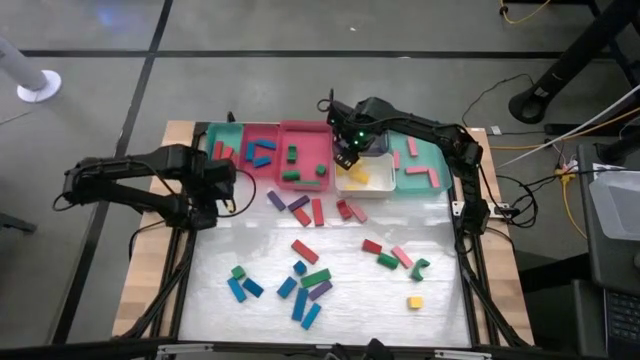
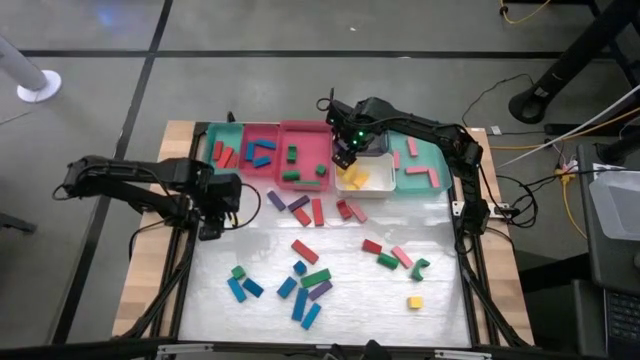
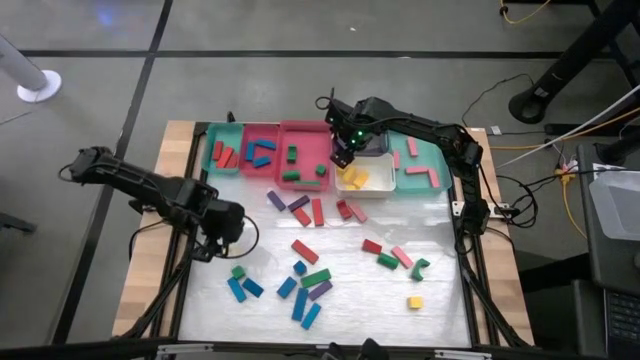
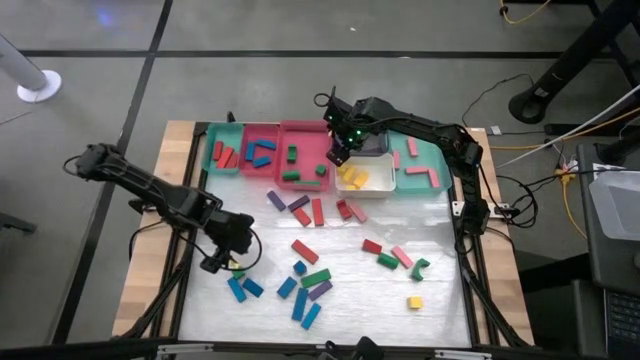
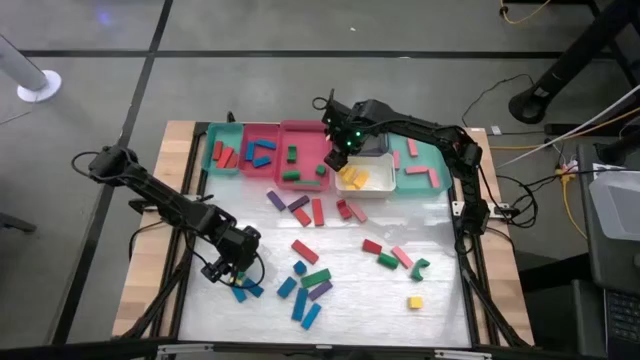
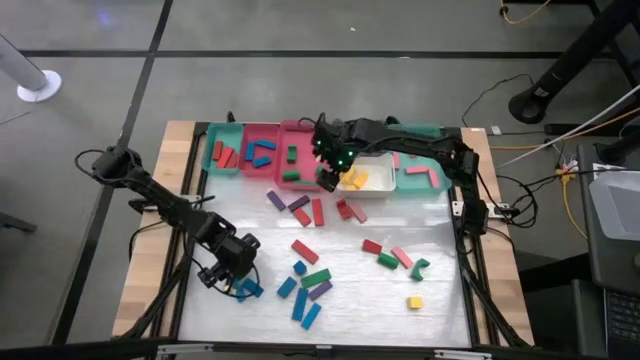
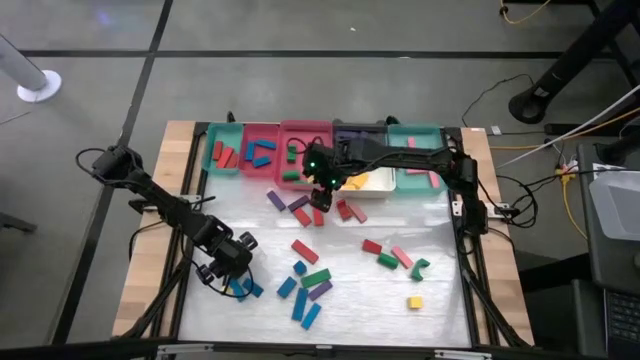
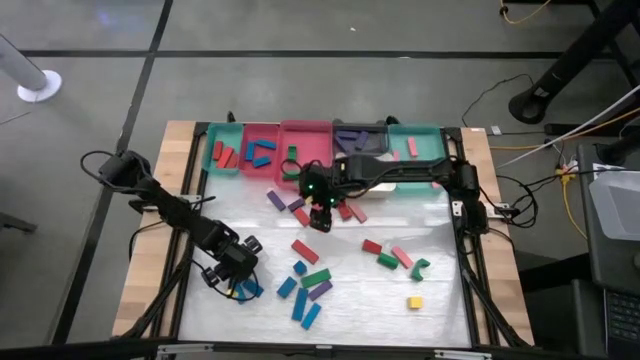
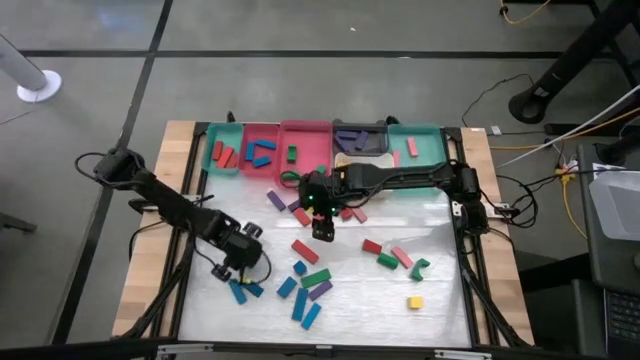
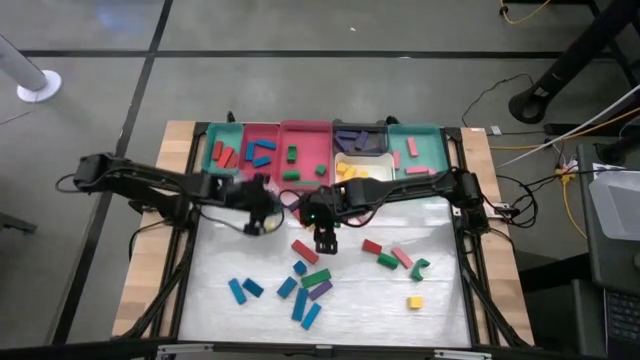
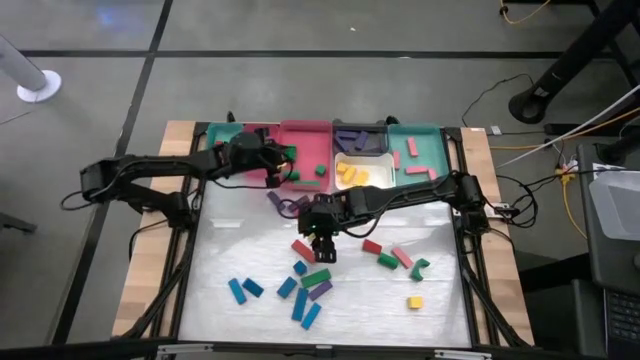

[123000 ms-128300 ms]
Task: Sort blocks
Put the green block into the right pink bin

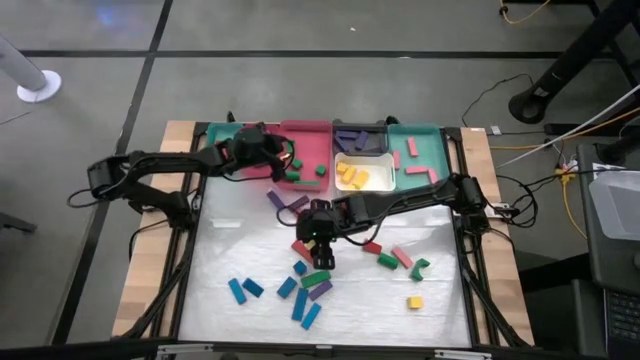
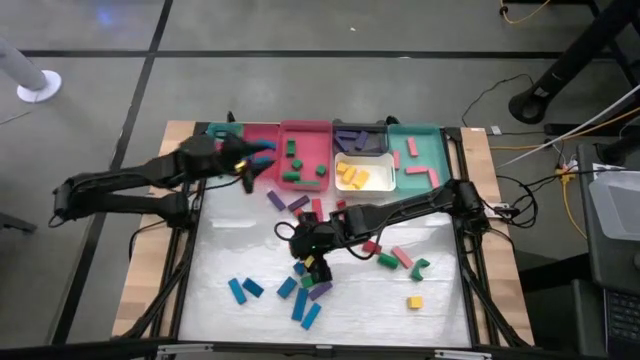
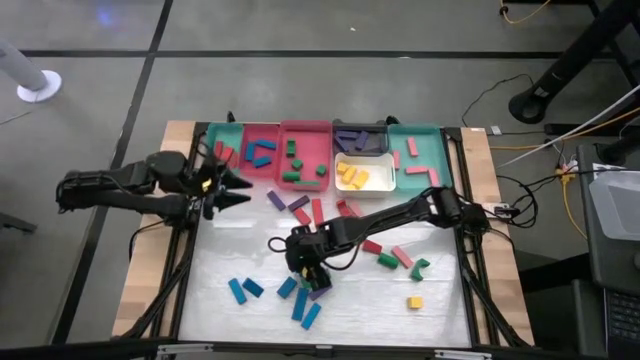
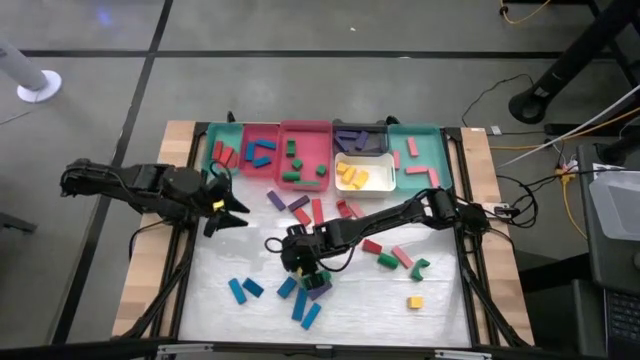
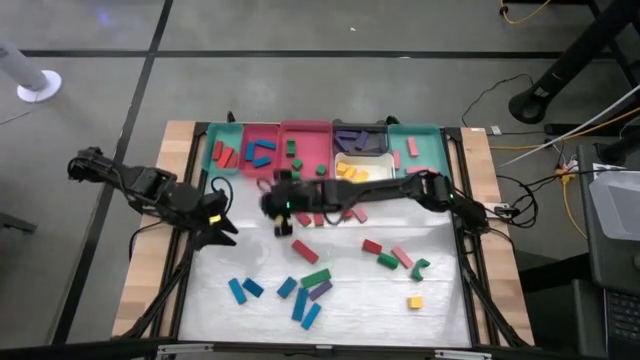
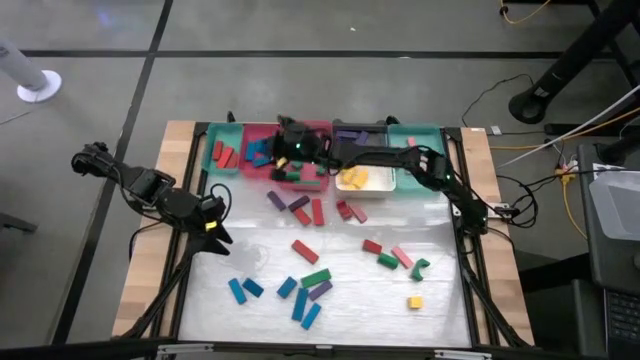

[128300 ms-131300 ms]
Put the blue block into the left pink bin

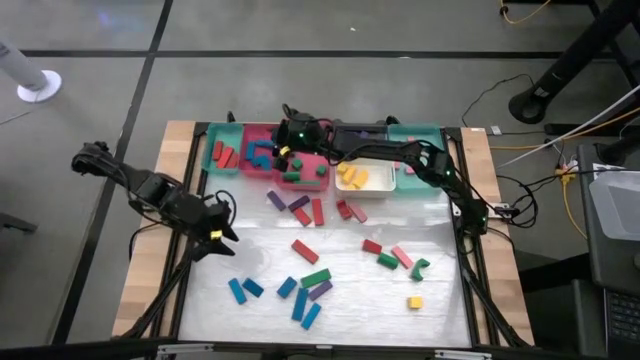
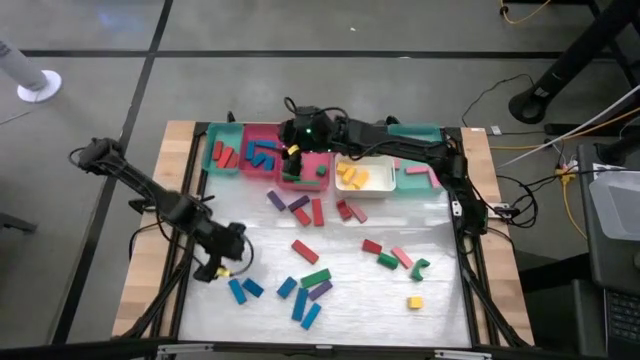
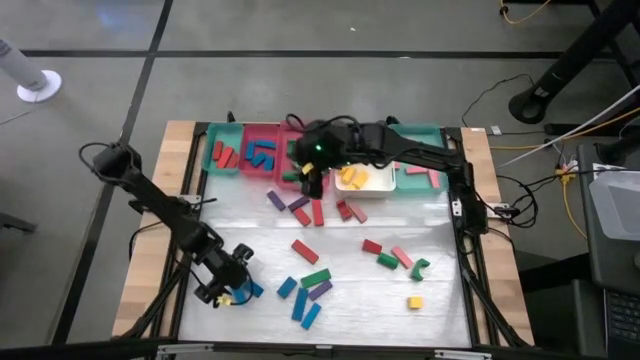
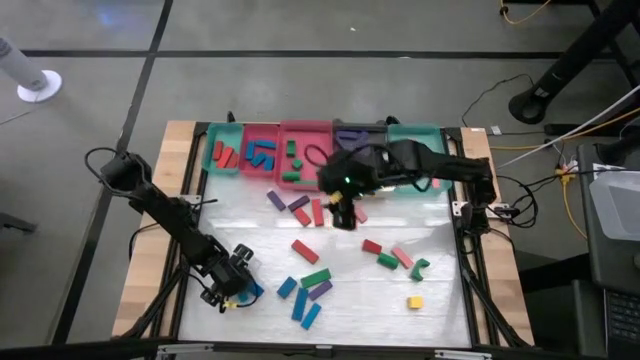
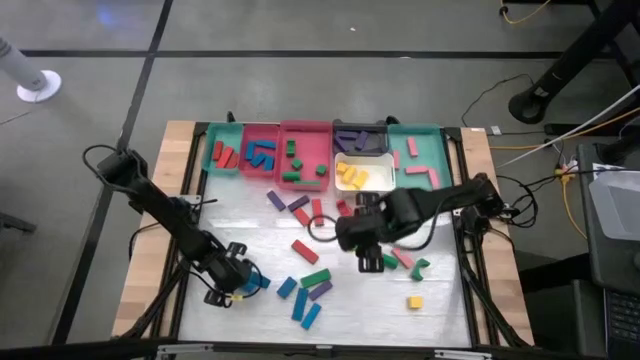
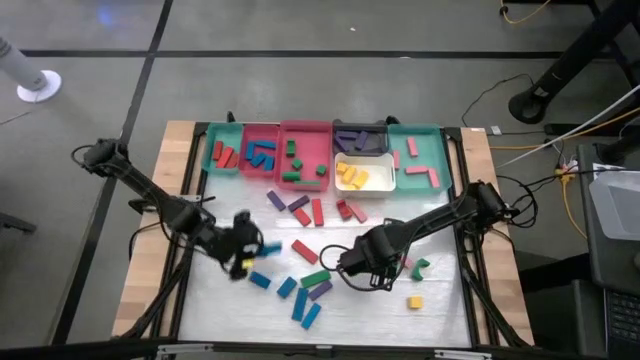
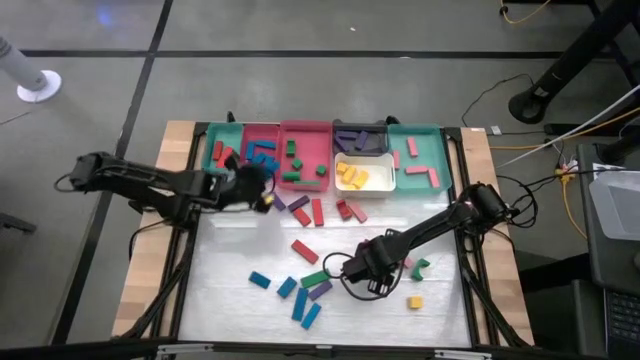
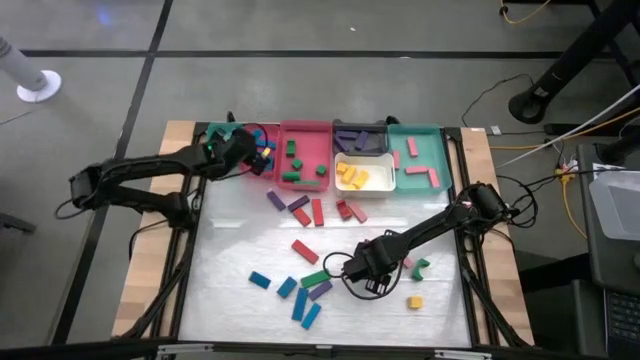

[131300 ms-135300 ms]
Put the blue block into the left pink bin

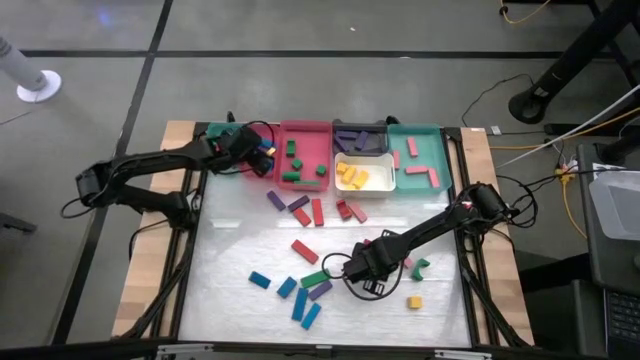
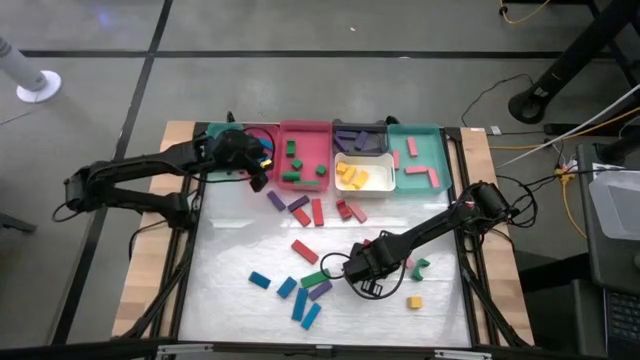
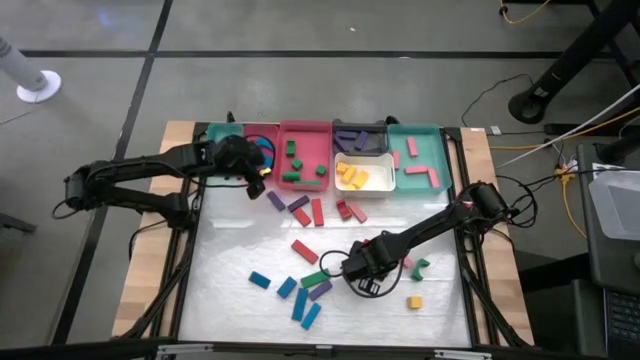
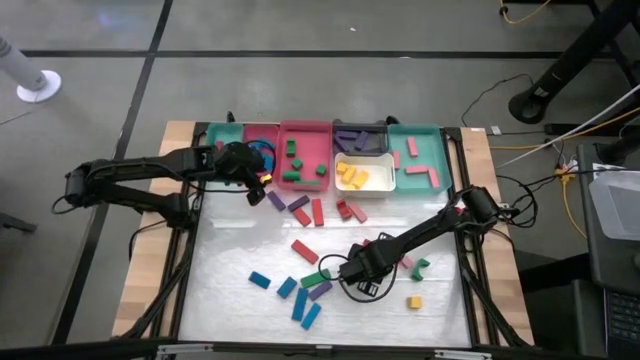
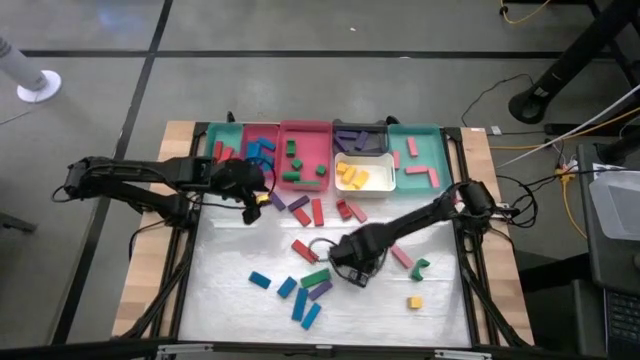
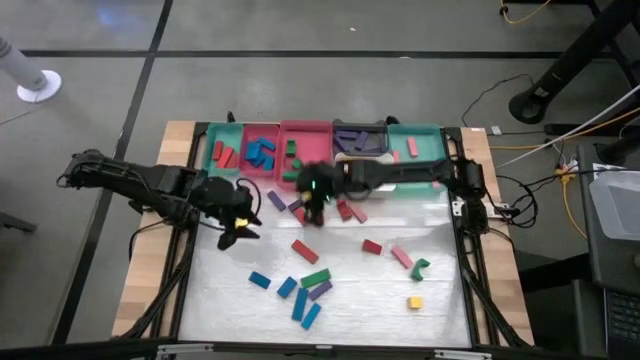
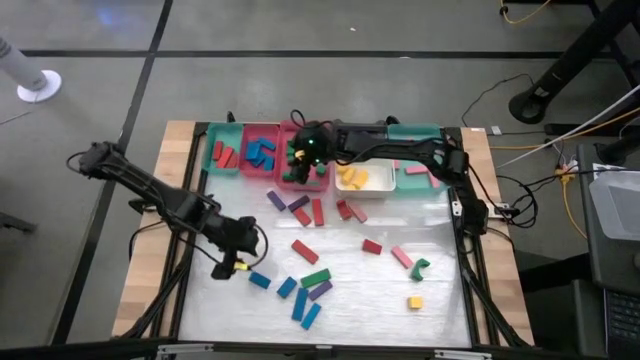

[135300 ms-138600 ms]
Put the green block into the right pink bin

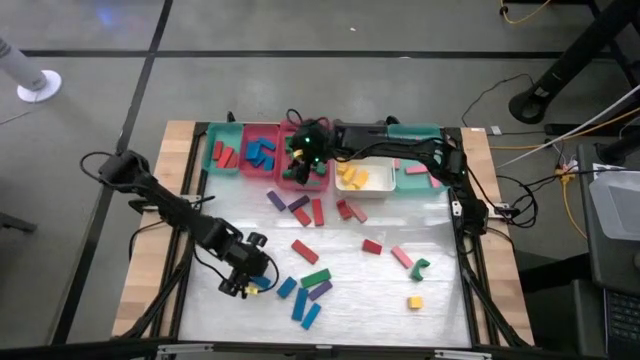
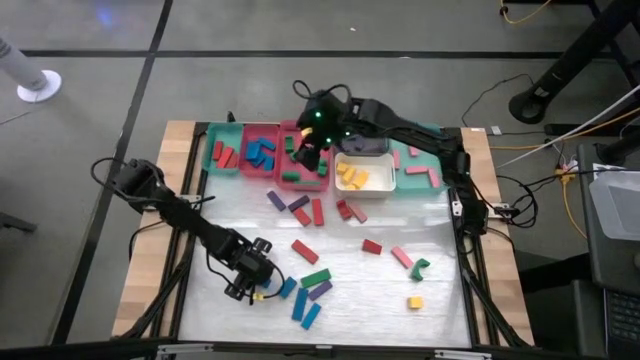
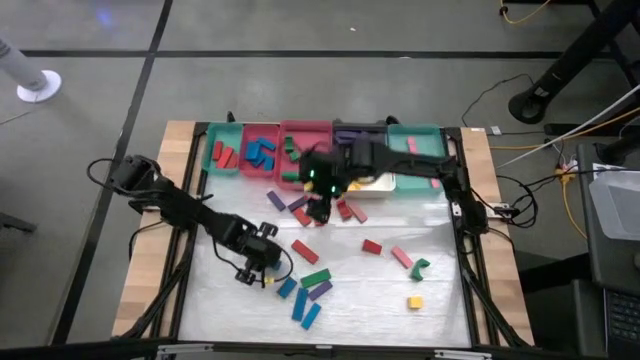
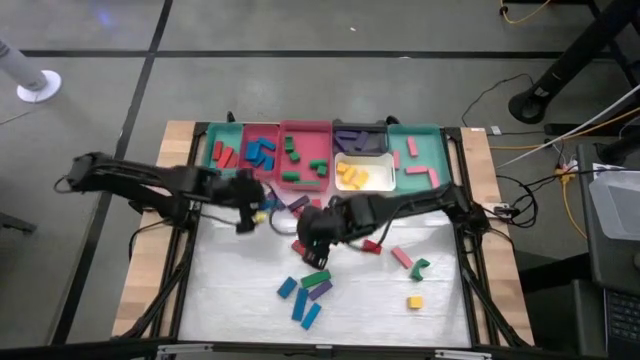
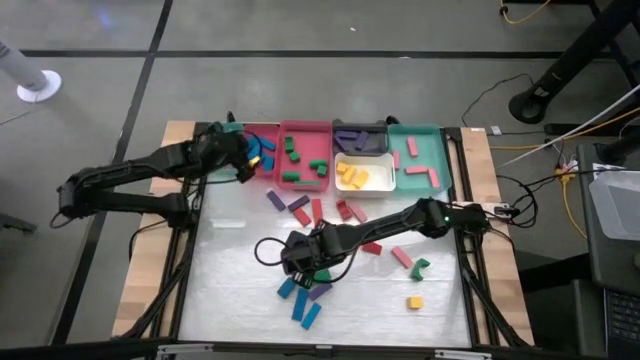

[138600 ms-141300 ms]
Put the blue block into the left pink bin

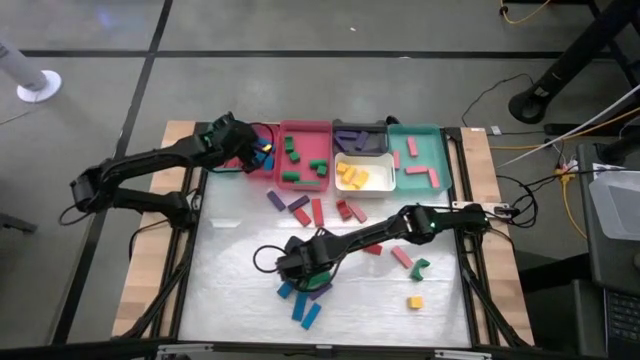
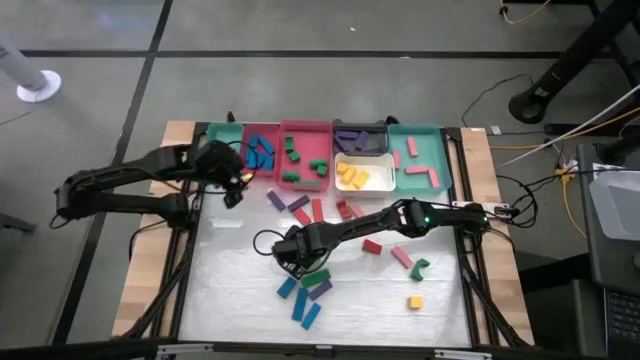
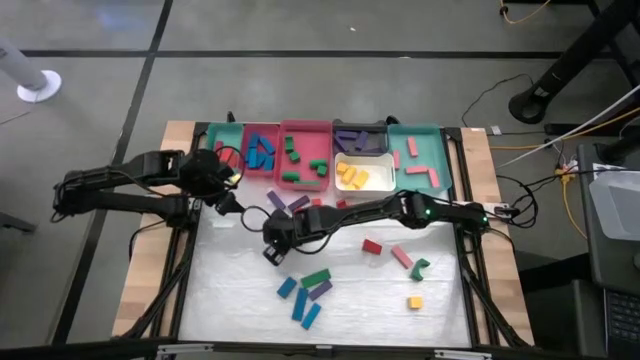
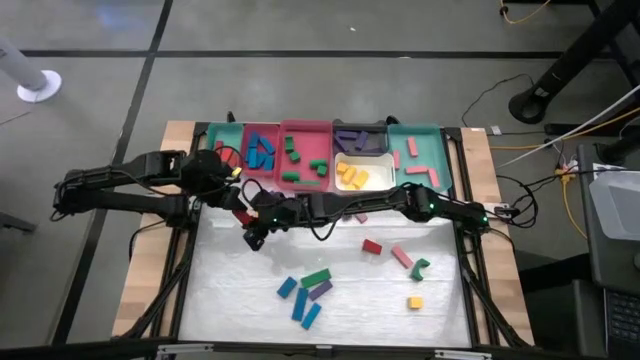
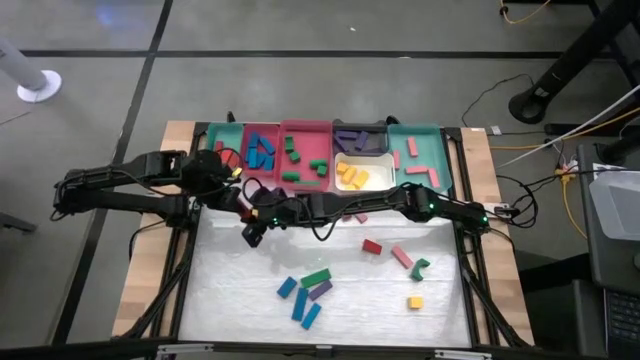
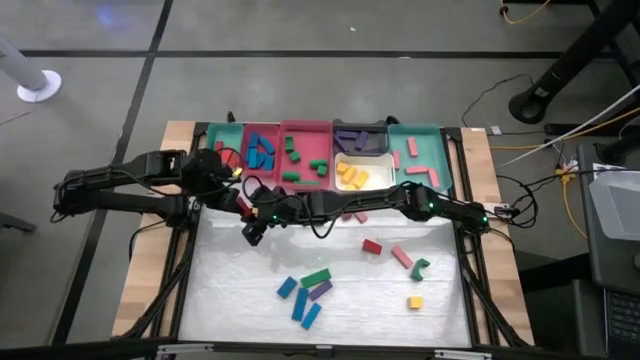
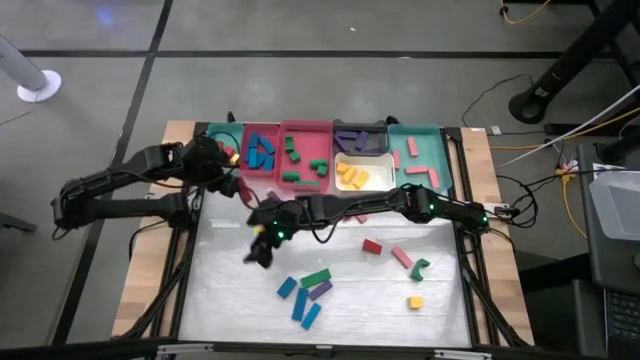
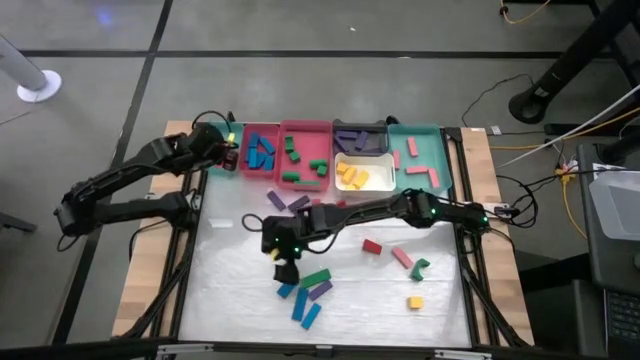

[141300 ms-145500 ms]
Put the red block into the left green bin
